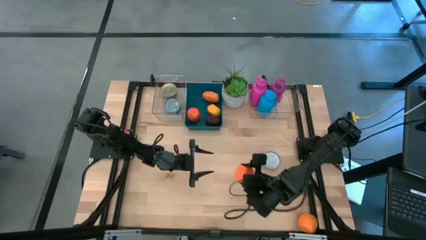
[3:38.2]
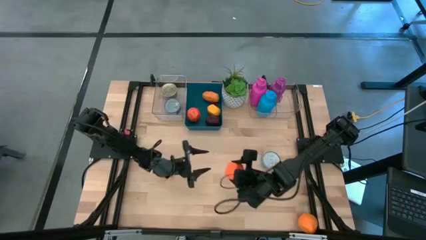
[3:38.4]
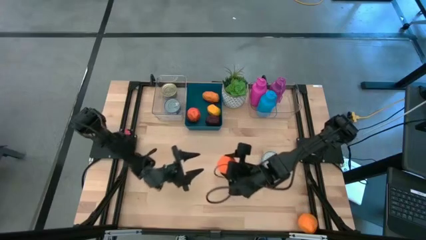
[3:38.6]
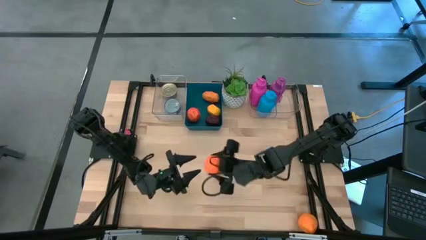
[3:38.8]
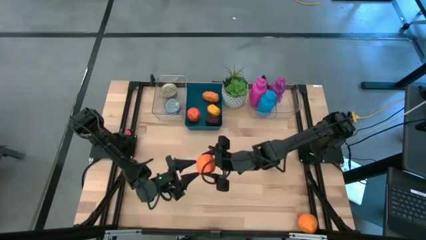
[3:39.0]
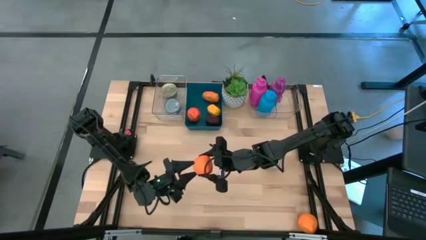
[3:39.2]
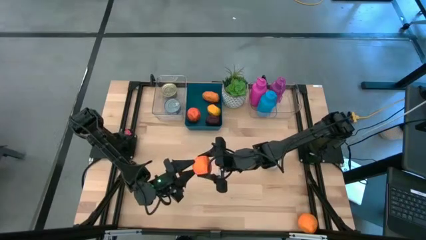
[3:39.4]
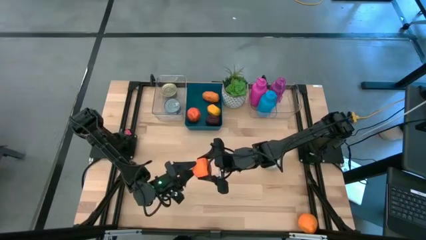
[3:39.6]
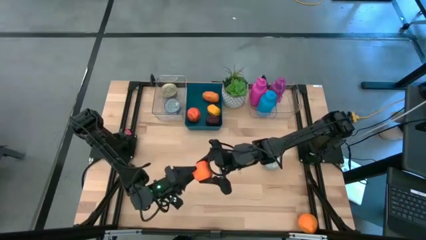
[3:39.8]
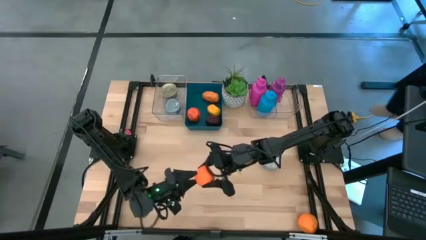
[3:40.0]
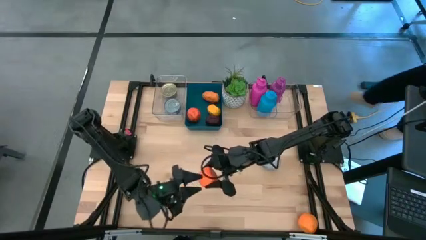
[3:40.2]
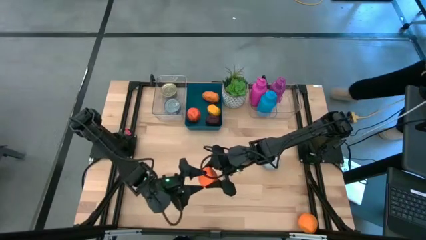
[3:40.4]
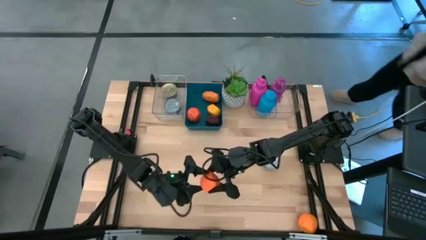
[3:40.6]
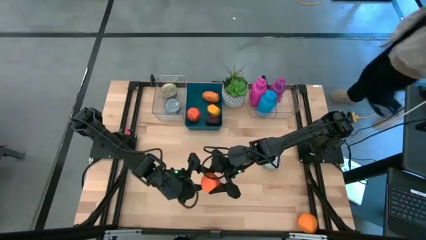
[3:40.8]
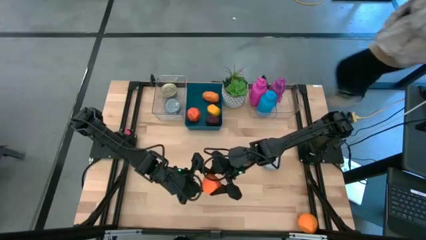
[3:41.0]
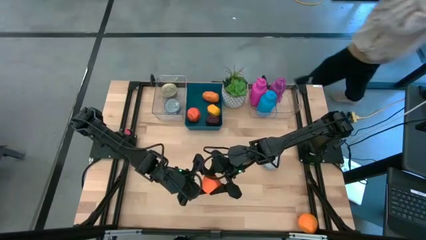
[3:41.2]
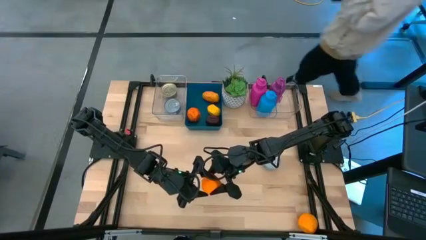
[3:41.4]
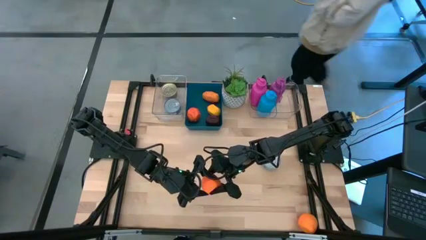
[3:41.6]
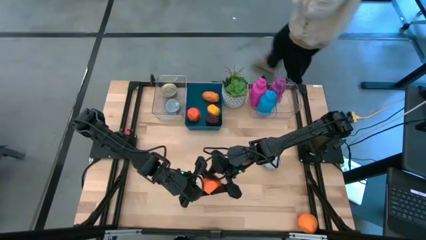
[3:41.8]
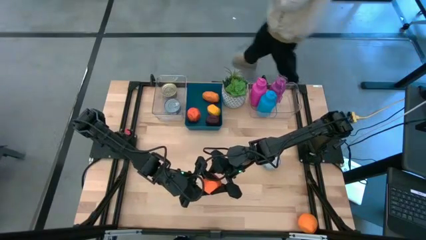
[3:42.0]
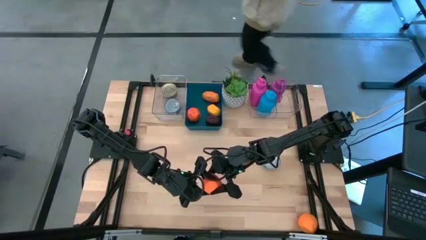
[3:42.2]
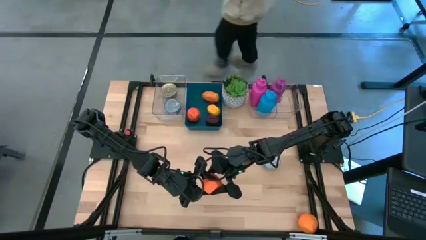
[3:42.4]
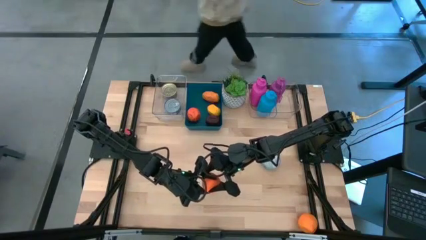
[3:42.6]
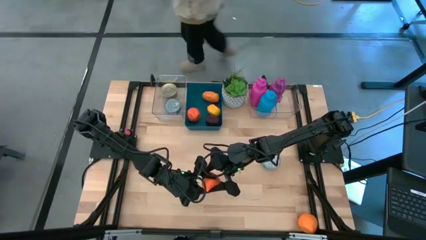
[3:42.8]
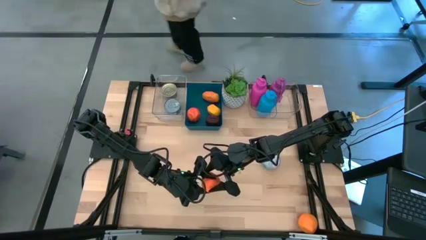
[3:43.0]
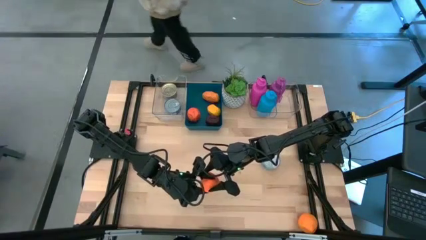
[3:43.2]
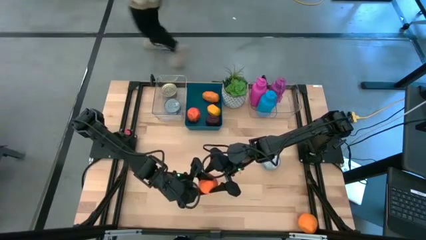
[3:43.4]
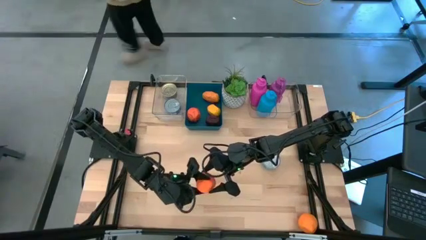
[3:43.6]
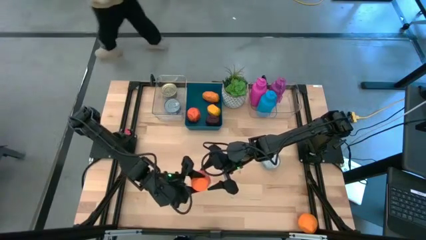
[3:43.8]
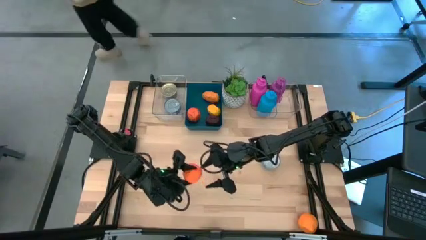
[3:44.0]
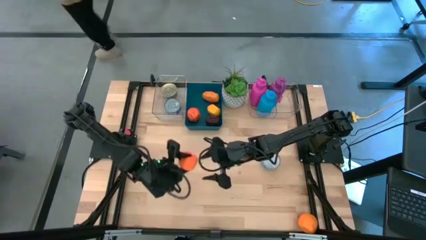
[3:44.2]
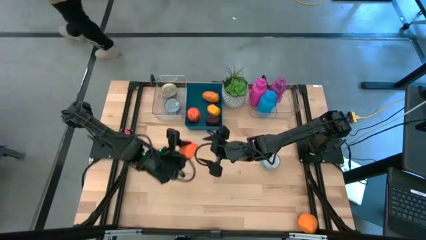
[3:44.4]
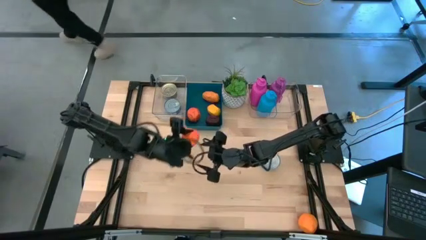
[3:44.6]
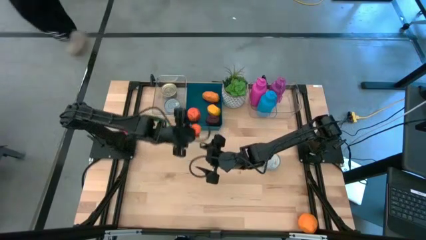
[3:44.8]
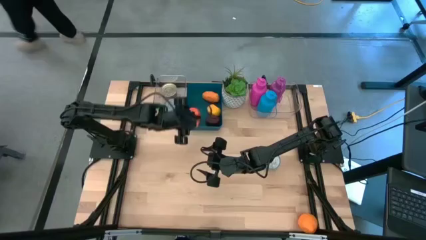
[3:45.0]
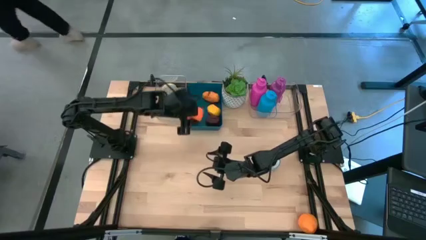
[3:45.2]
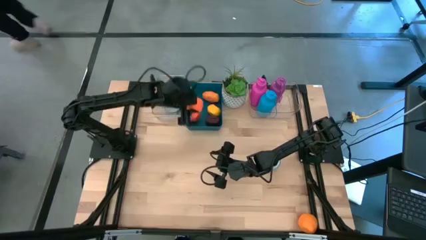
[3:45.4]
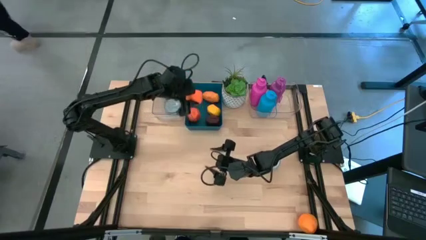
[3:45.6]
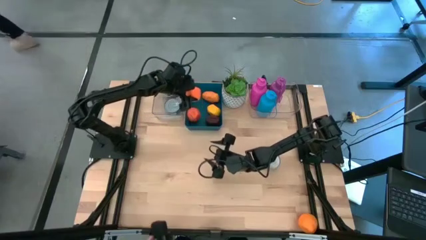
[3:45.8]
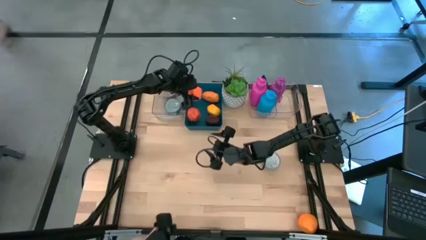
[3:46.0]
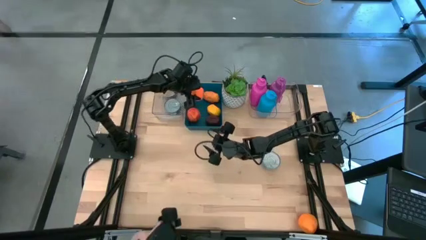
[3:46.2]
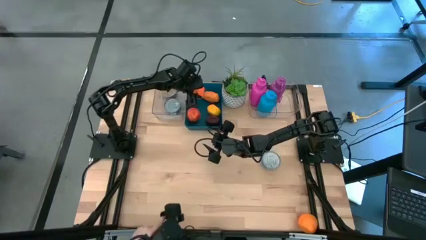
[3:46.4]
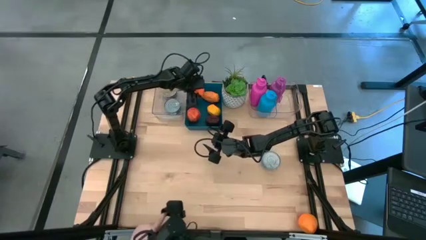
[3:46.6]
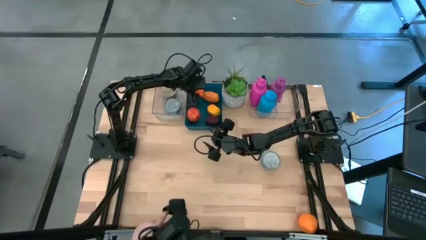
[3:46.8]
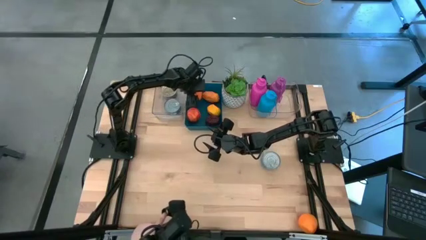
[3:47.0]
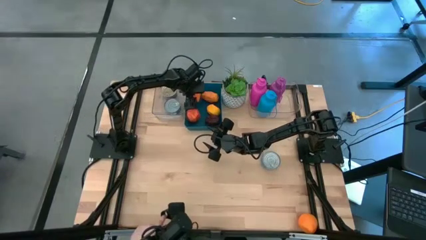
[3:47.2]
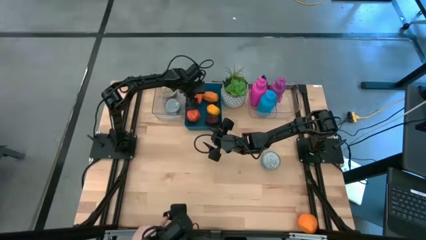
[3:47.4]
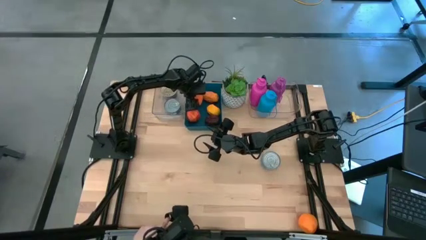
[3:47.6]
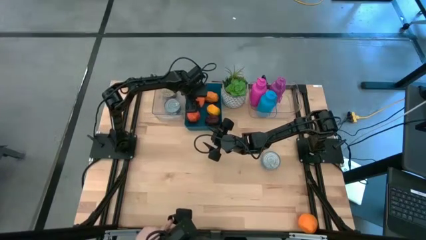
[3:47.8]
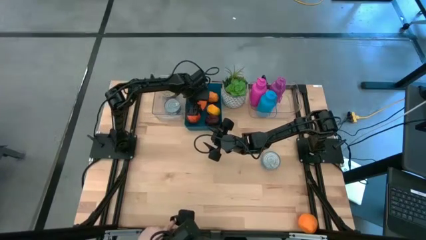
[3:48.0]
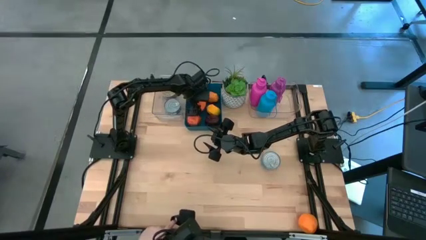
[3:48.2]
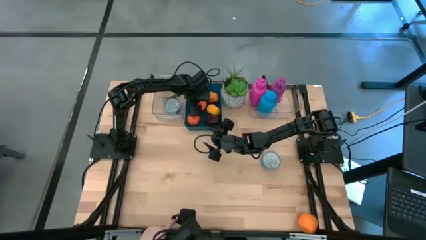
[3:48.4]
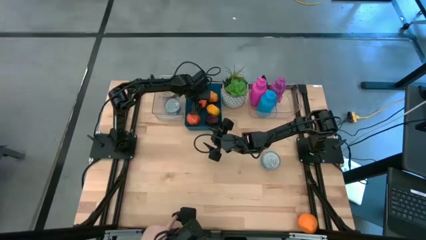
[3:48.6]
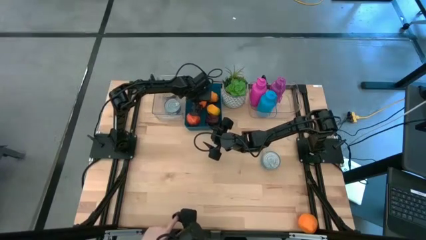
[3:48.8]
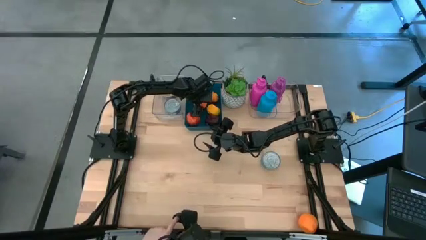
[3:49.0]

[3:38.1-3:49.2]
Task: Pick & Place Food Item
Put the top orange into the blue bin

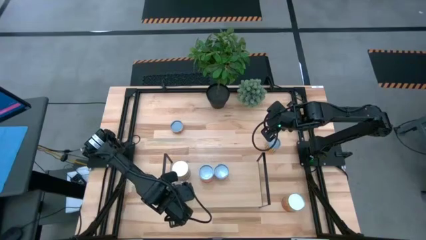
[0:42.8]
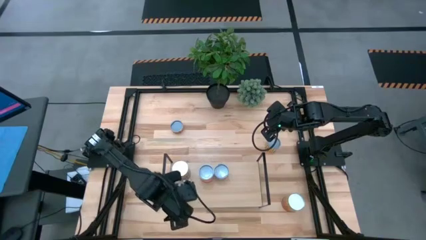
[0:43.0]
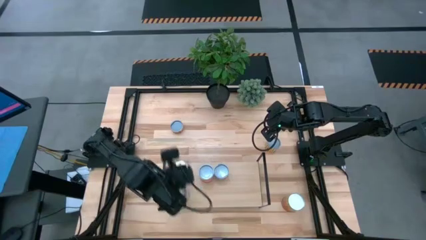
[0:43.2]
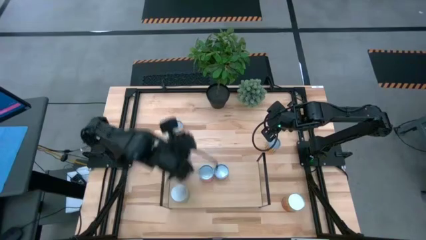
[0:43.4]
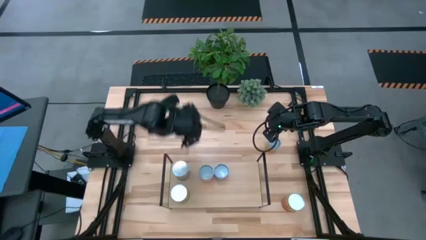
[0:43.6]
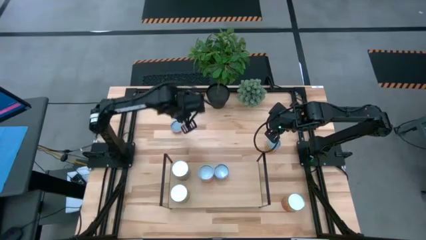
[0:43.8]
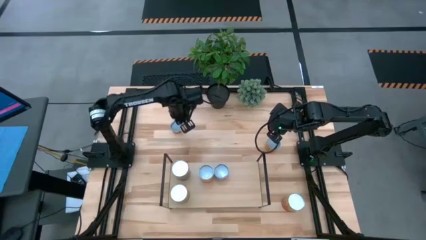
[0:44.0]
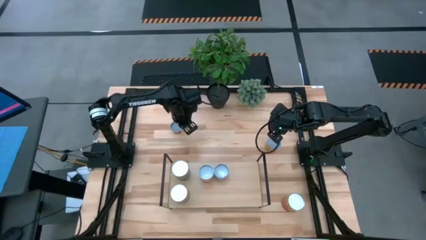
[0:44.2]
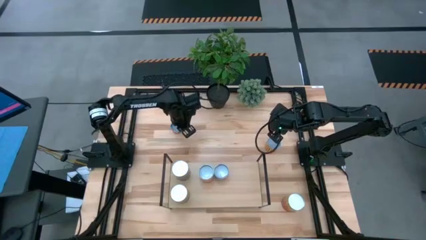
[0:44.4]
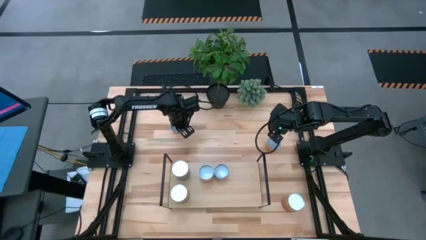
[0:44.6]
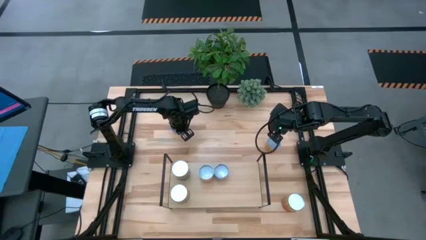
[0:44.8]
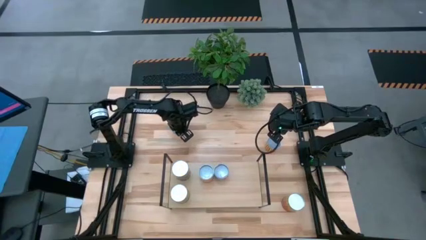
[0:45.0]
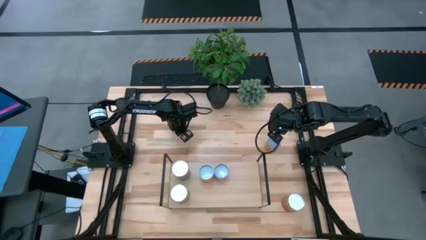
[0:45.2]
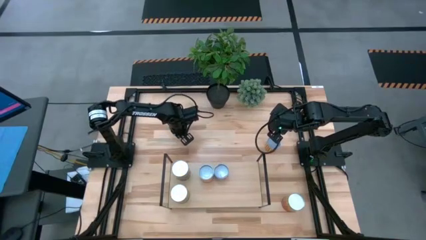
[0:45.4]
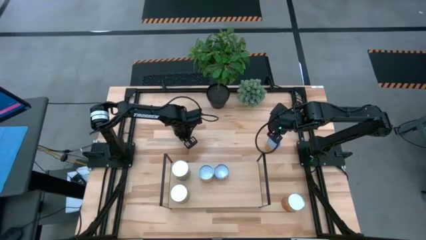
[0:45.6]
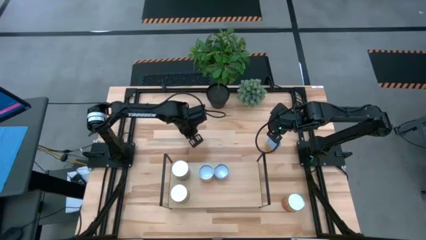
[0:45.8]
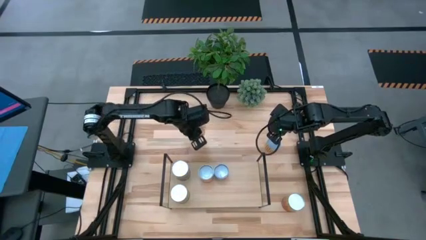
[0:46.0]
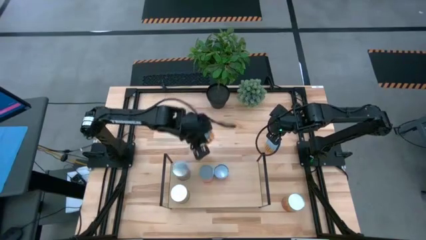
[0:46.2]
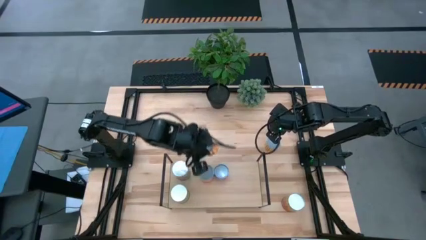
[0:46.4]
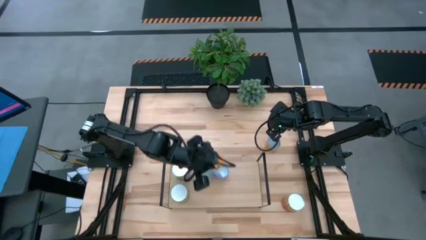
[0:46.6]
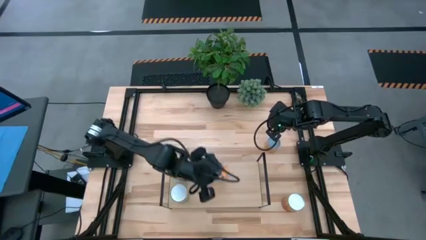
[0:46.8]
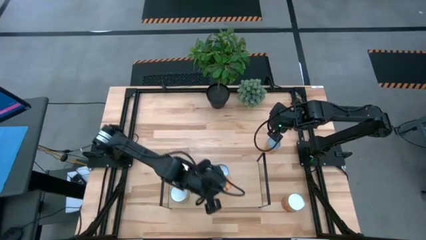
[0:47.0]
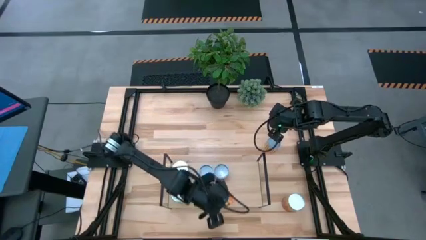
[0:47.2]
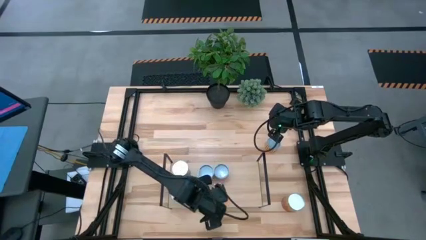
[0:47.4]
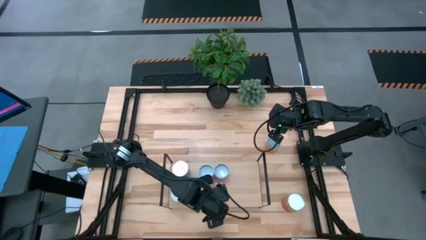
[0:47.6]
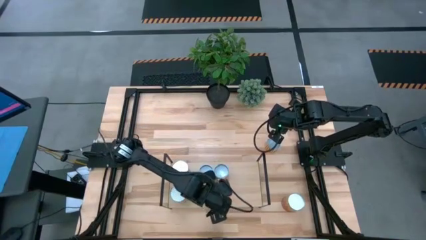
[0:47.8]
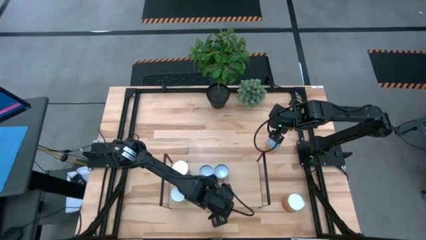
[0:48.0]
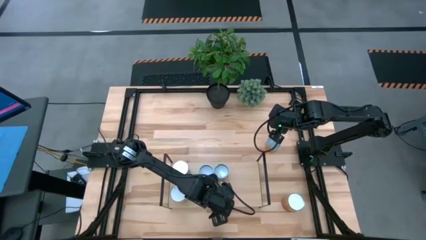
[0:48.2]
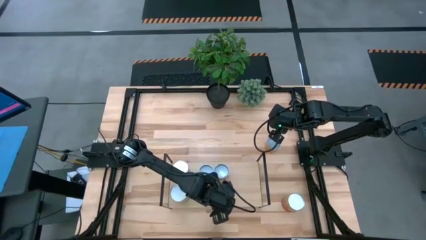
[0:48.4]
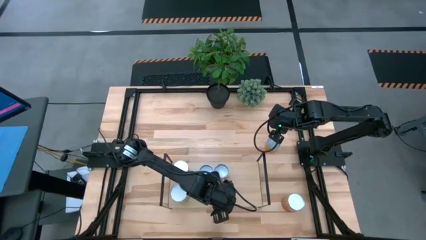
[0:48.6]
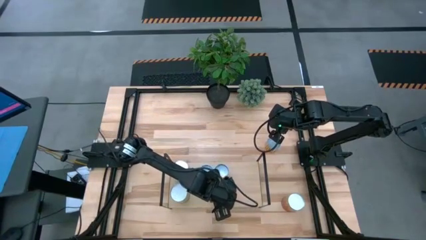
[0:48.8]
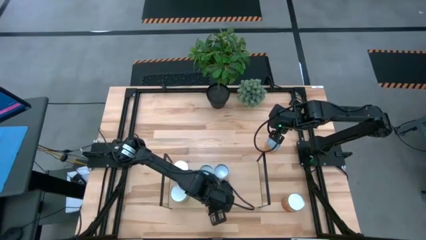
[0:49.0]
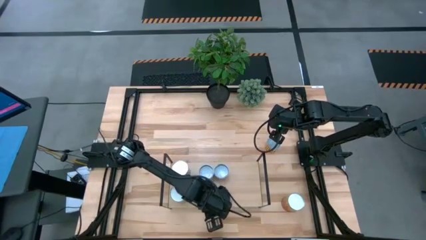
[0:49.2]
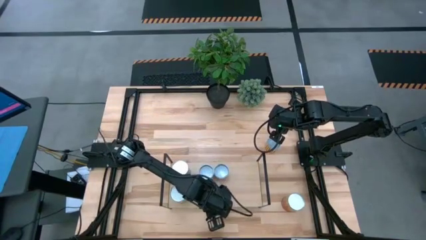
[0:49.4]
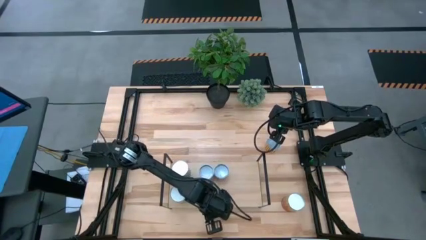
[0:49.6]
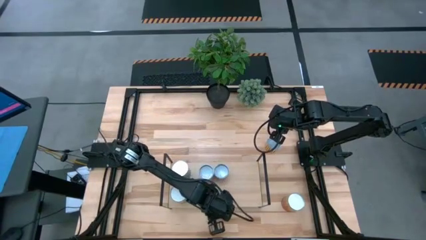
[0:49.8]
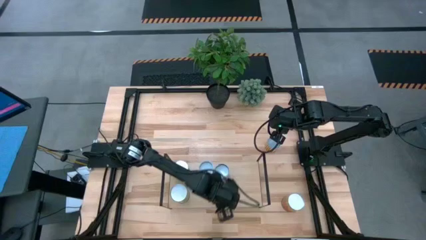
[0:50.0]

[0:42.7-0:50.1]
Task: Pick and place cans onto a shelf
Put the yellow pineapple can on the shelf
